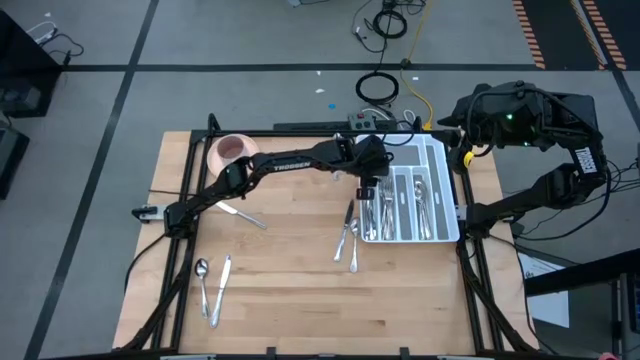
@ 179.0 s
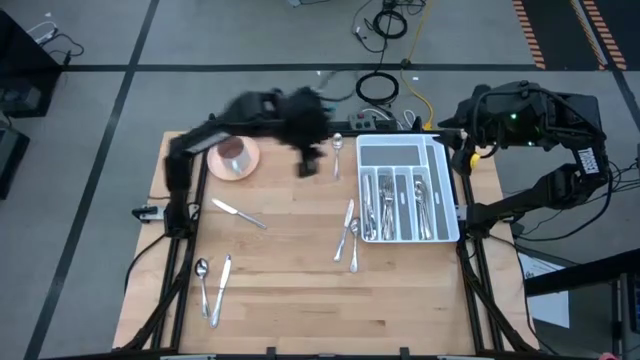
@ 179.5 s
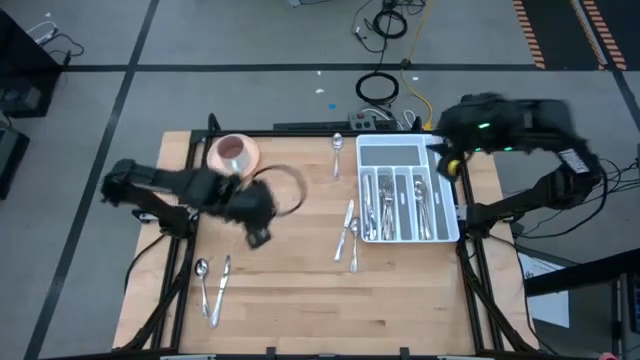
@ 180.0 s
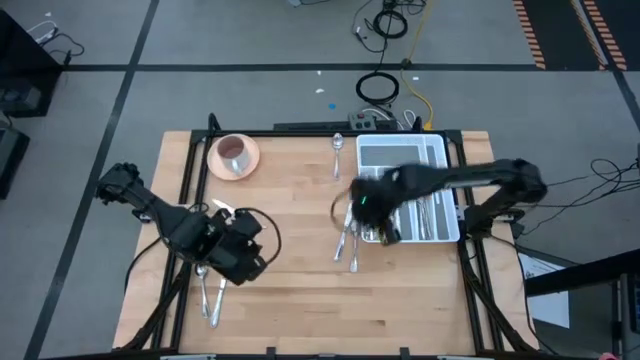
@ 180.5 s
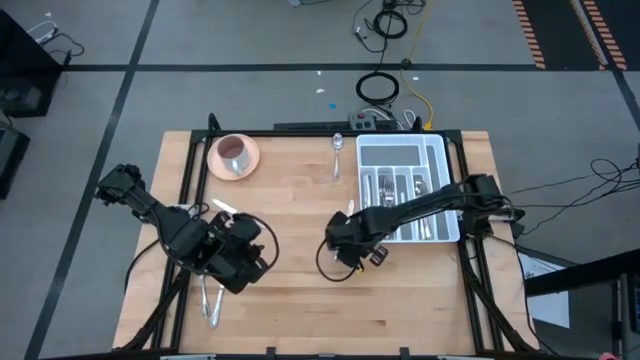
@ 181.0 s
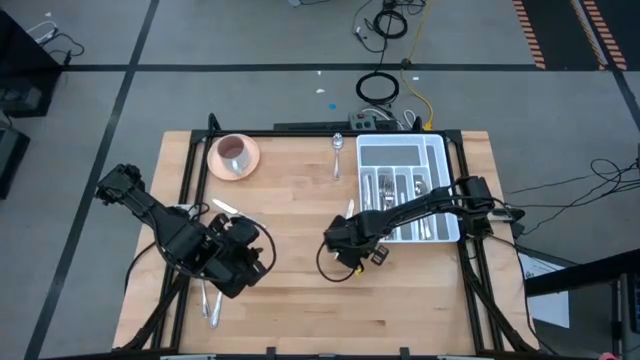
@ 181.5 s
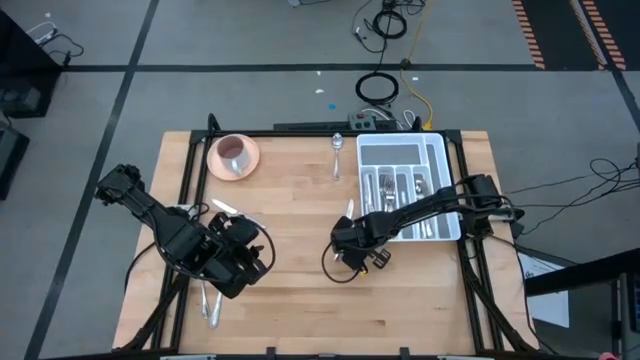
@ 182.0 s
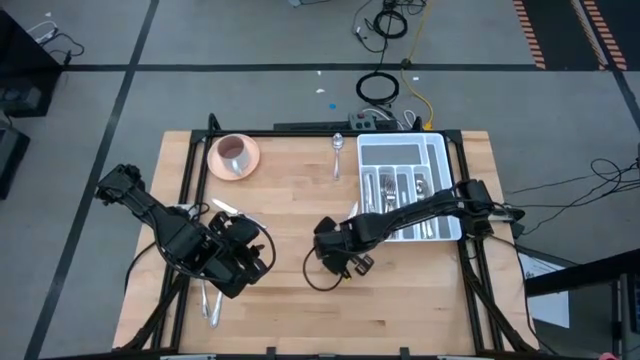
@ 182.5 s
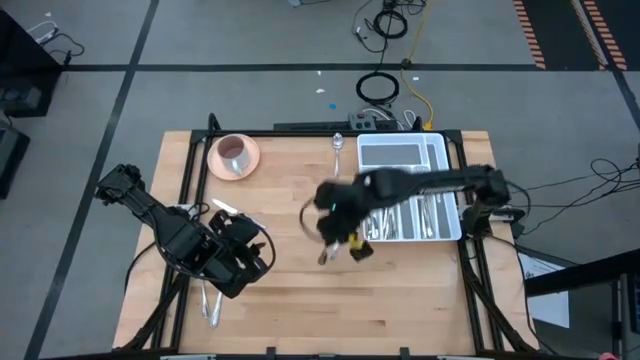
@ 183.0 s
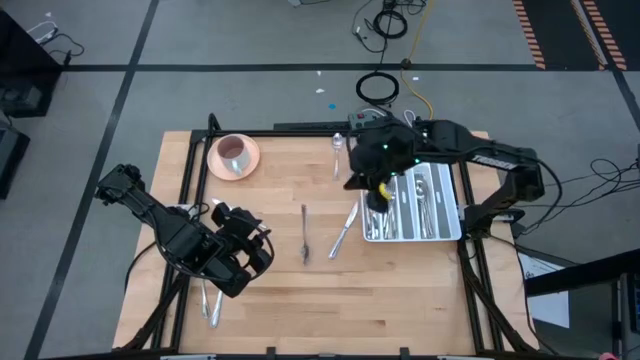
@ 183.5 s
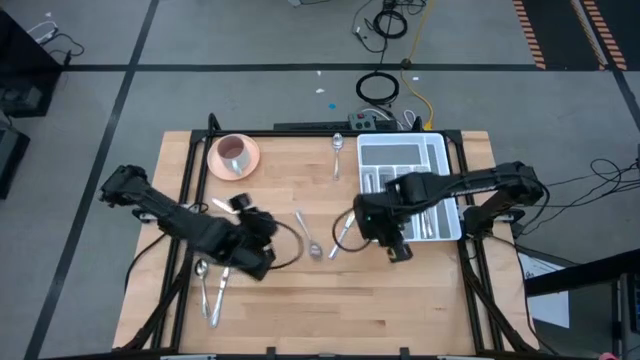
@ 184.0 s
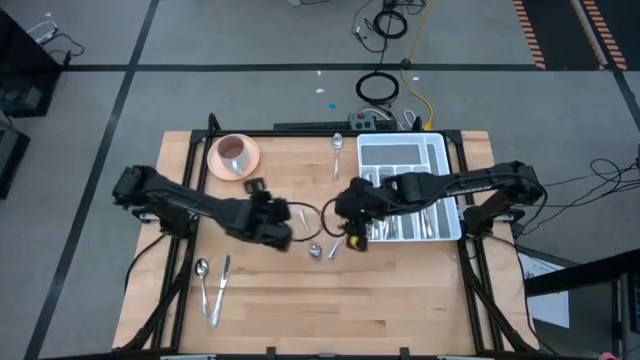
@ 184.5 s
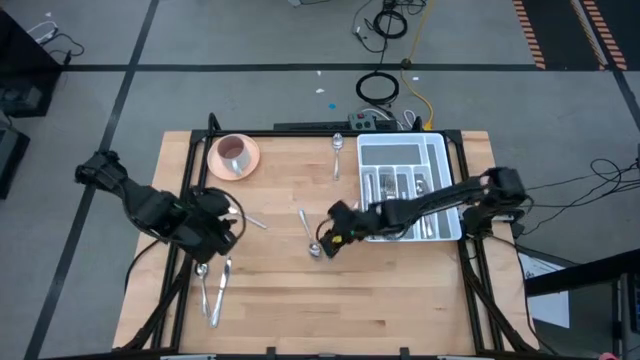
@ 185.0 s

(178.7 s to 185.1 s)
Task: Sort silverware
Put the silver spoon into the silverware rack

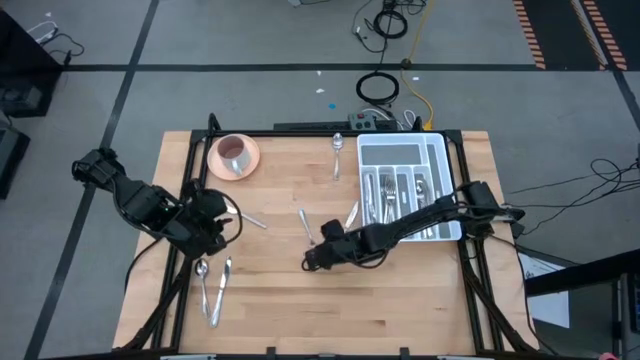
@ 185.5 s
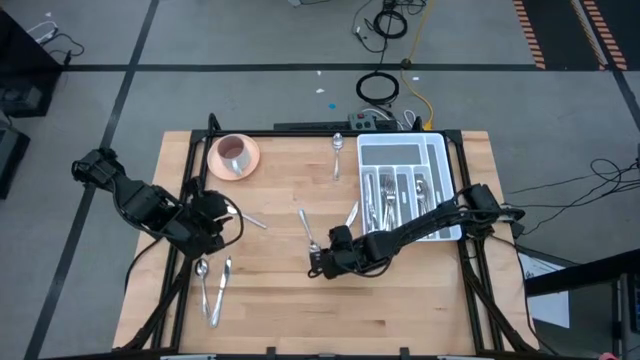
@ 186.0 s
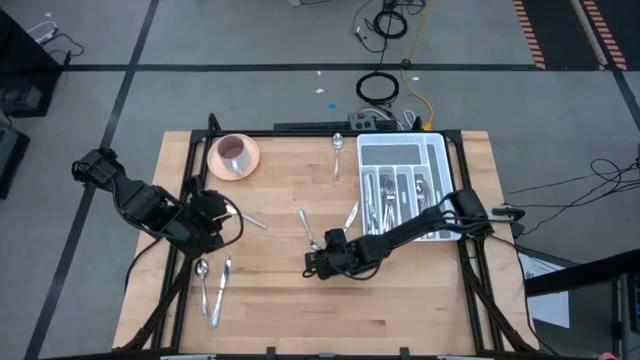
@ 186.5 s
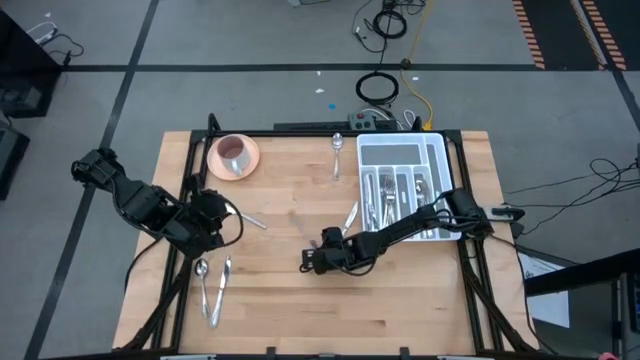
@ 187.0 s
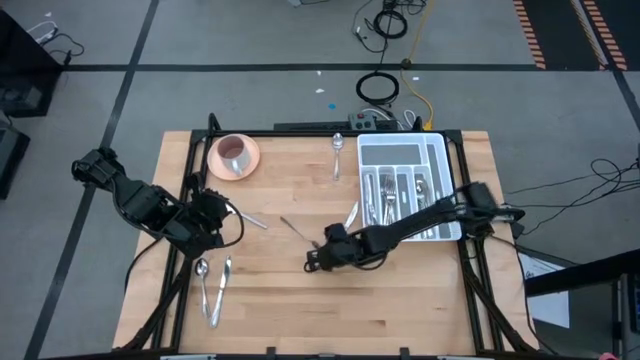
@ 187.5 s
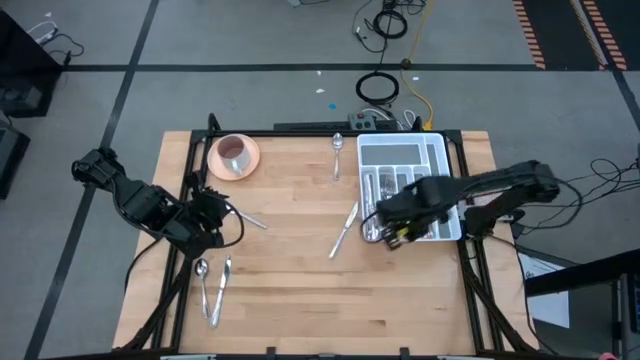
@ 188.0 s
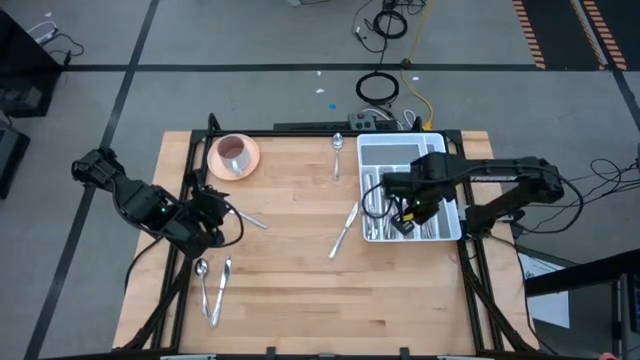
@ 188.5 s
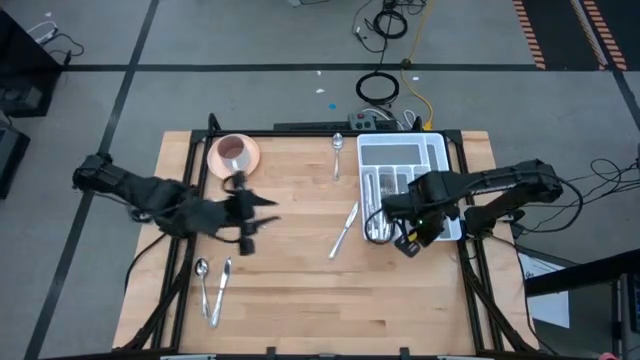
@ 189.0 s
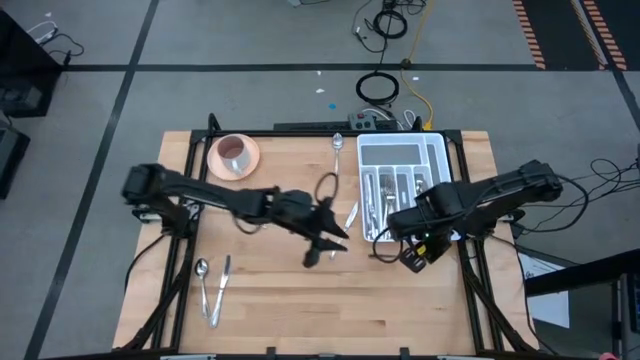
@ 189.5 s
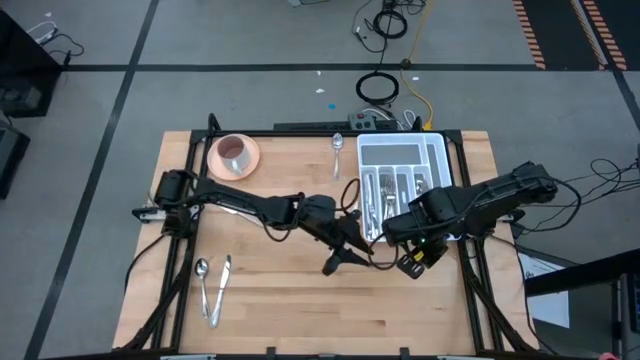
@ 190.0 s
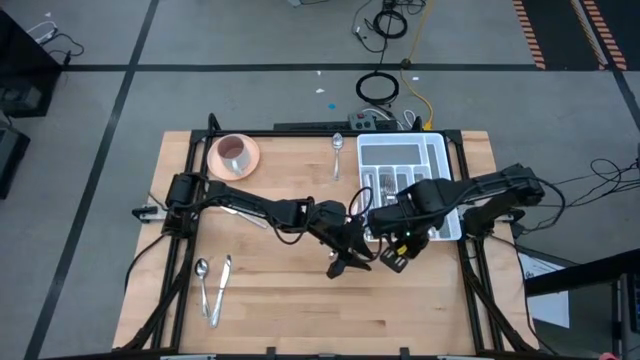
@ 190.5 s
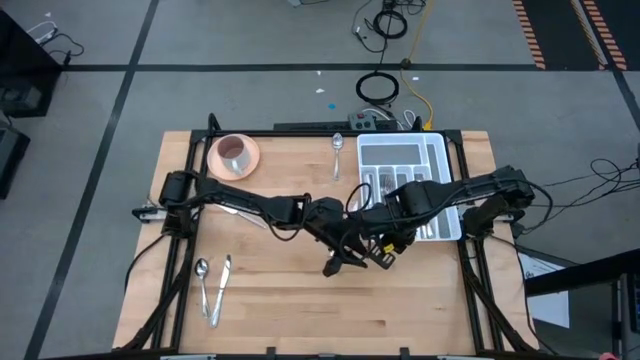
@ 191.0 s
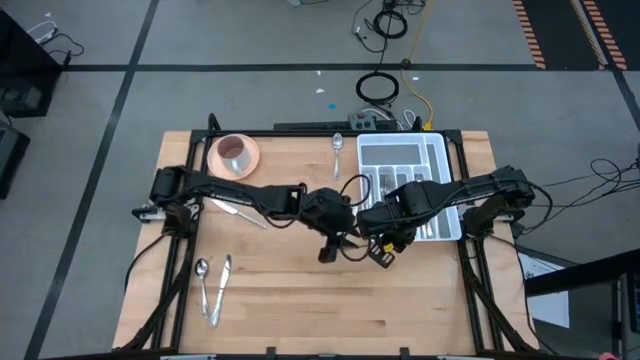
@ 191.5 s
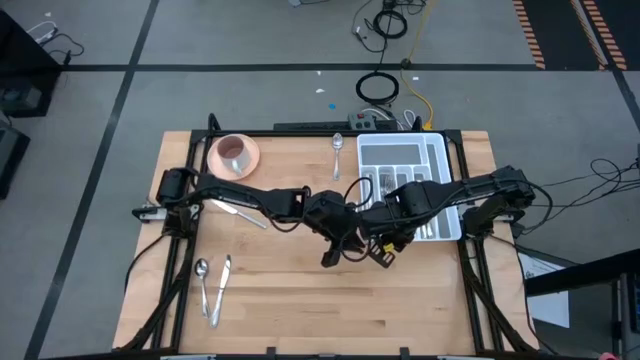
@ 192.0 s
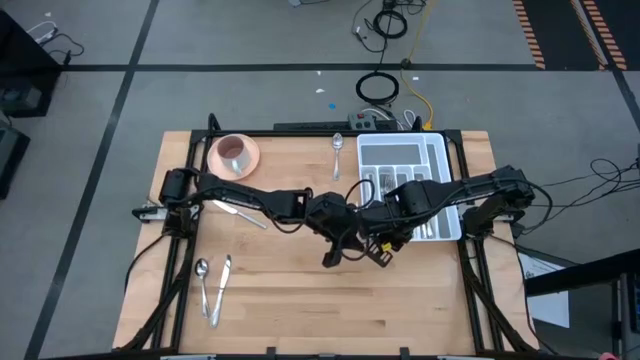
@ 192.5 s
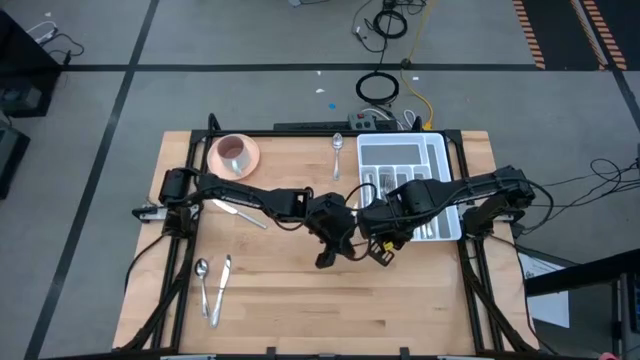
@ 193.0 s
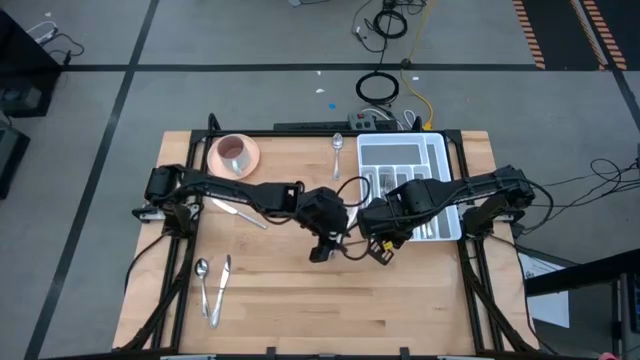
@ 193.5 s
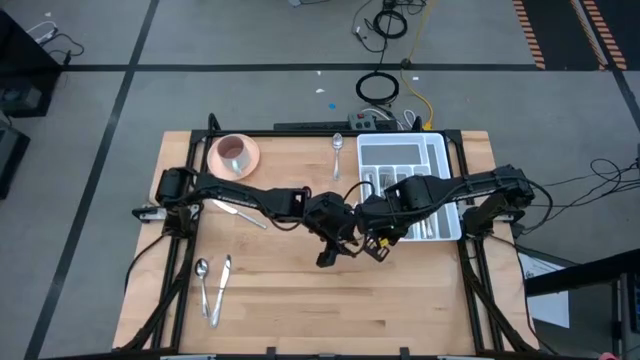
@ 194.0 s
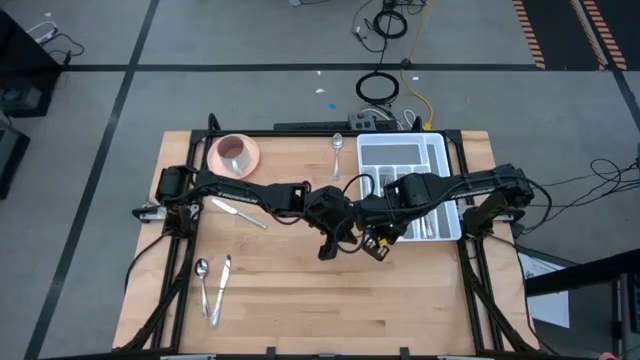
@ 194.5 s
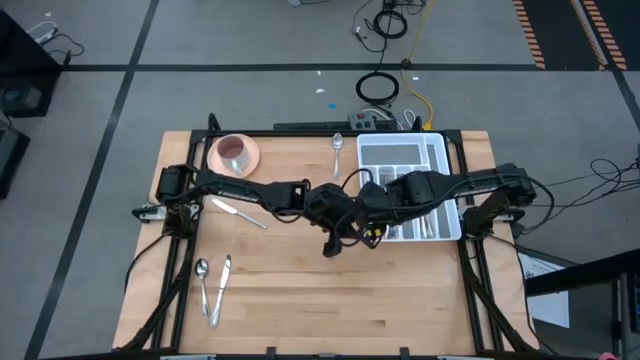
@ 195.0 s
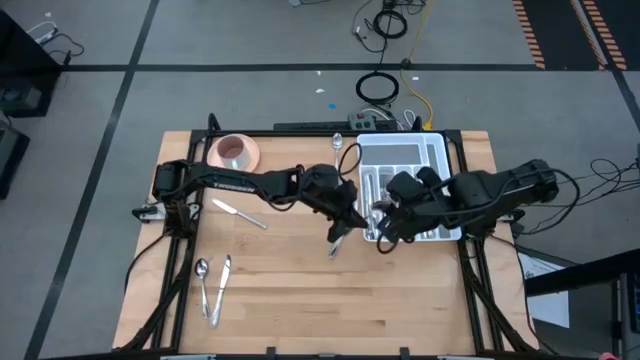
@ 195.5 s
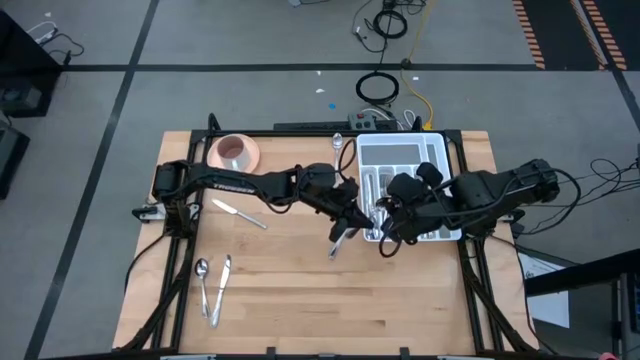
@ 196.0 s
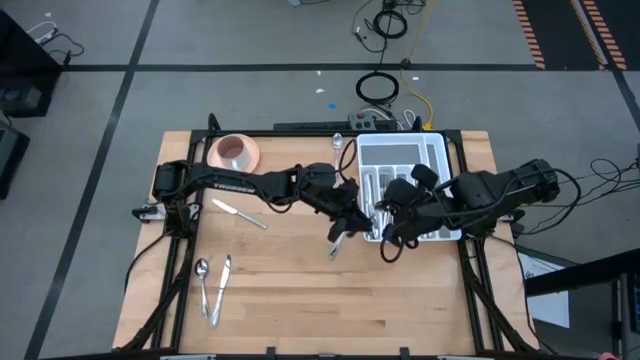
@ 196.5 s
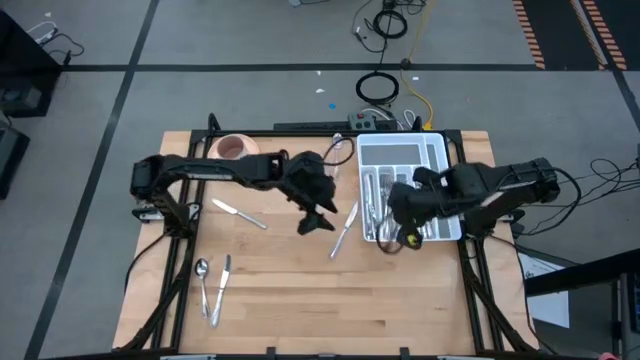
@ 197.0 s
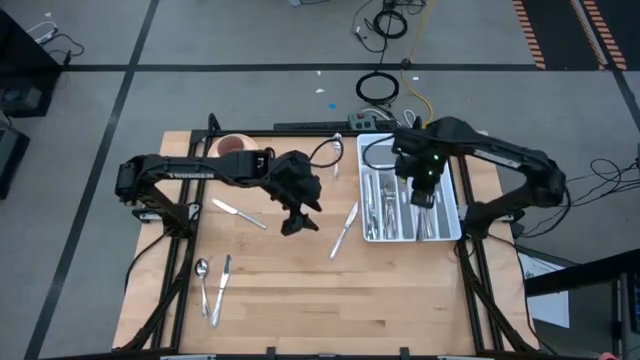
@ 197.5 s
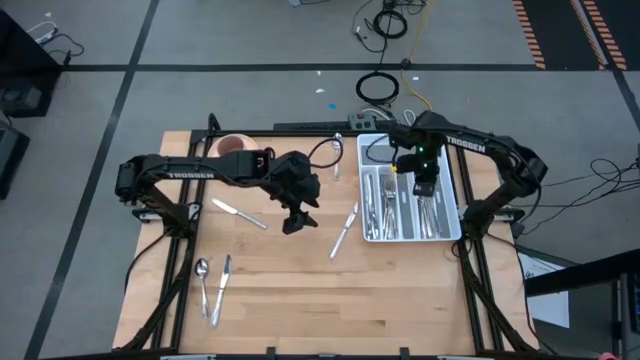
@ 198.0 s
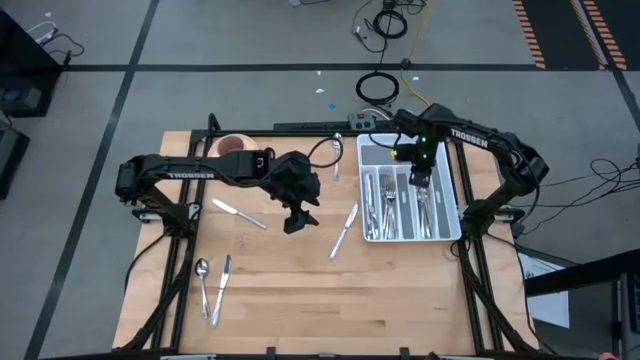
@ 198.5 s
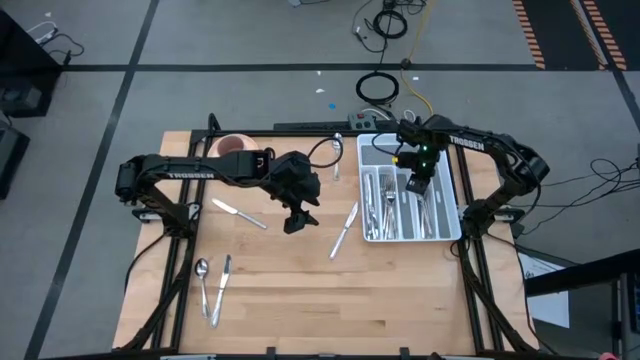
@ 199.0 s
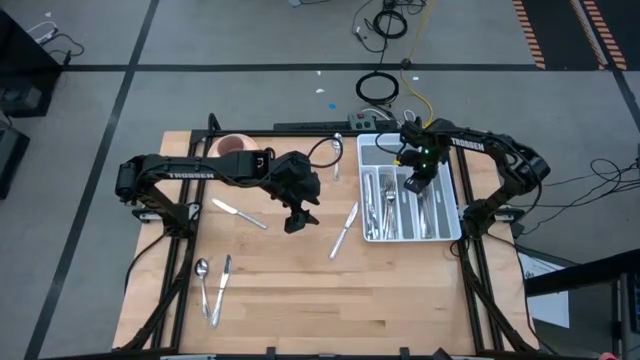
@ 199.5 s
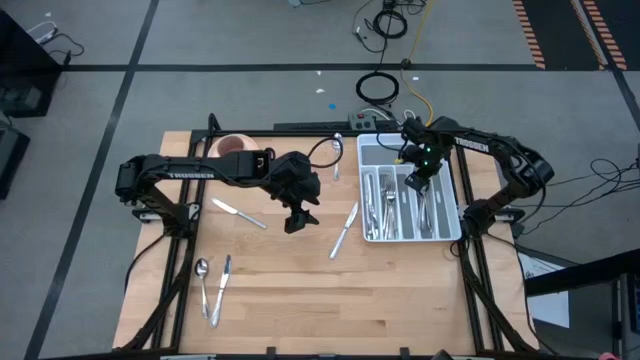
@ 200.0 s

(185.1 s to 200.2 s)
Put the silver spoon into the silverware rack
